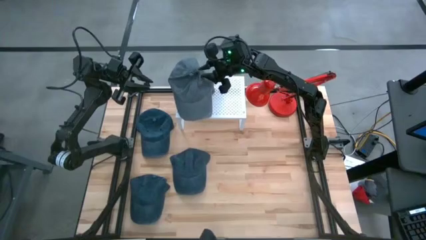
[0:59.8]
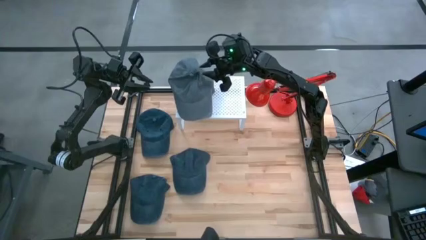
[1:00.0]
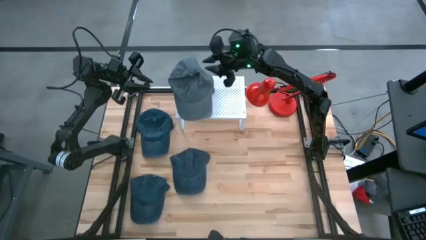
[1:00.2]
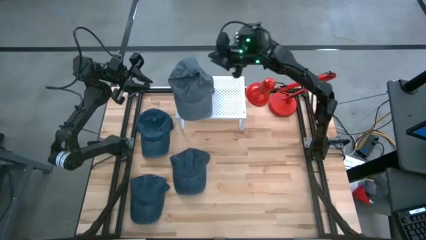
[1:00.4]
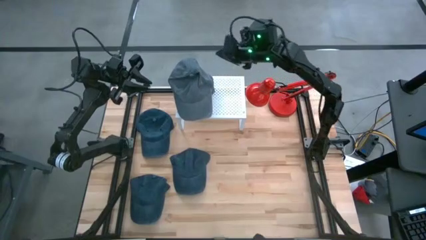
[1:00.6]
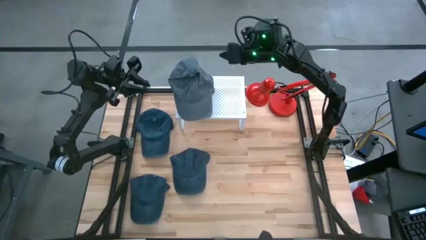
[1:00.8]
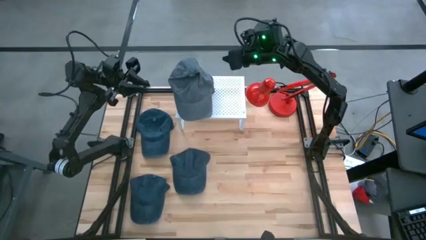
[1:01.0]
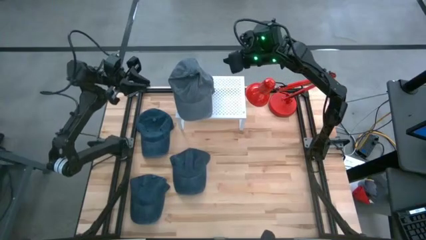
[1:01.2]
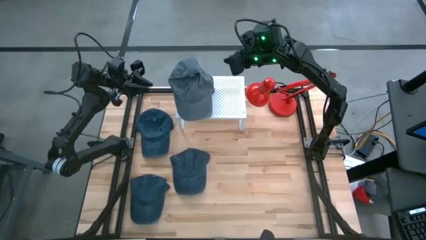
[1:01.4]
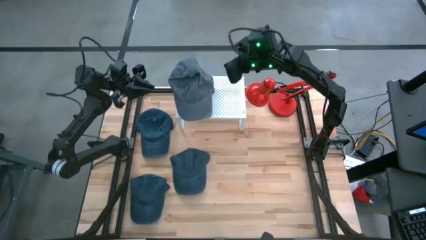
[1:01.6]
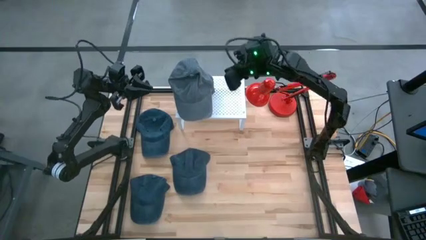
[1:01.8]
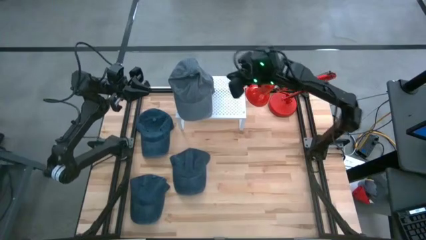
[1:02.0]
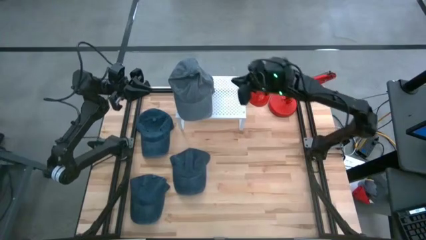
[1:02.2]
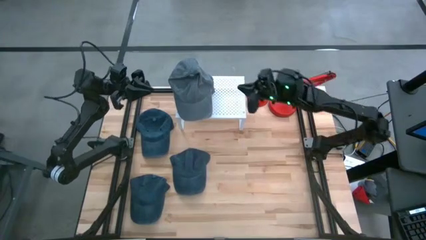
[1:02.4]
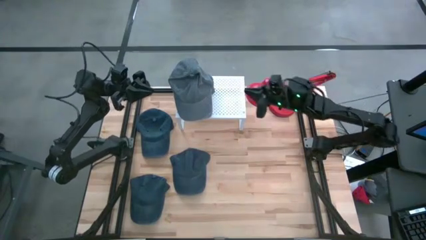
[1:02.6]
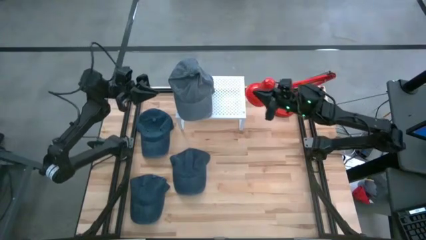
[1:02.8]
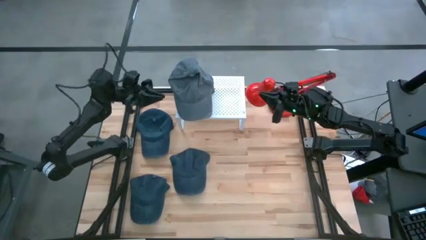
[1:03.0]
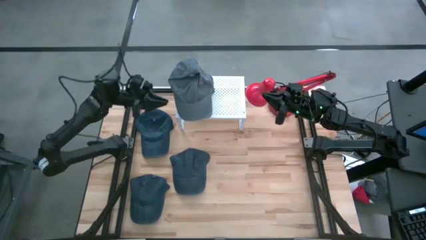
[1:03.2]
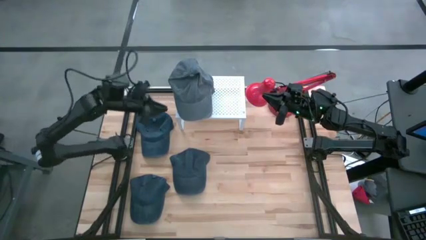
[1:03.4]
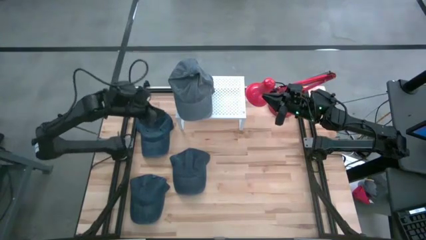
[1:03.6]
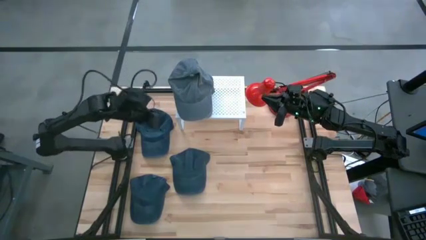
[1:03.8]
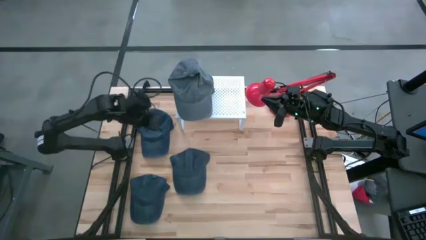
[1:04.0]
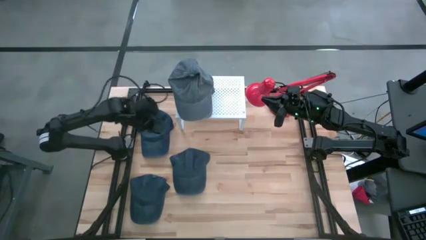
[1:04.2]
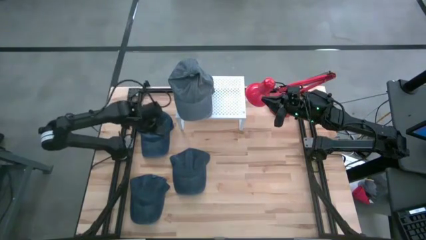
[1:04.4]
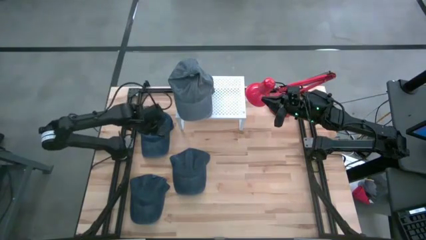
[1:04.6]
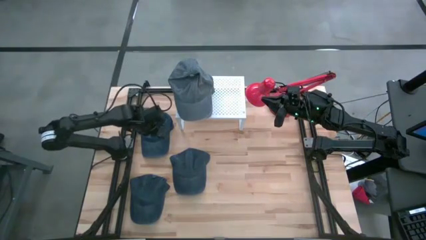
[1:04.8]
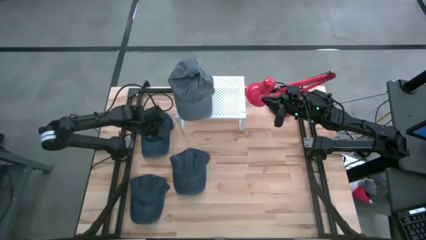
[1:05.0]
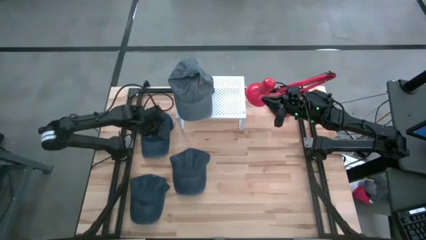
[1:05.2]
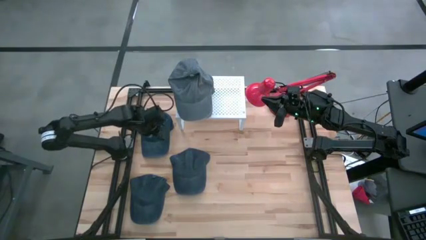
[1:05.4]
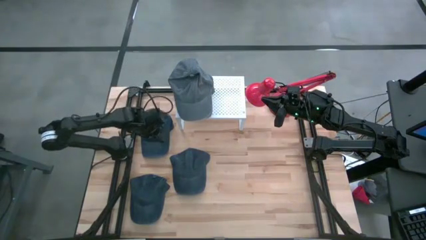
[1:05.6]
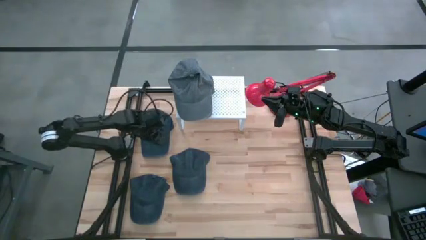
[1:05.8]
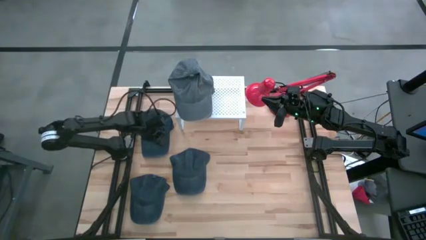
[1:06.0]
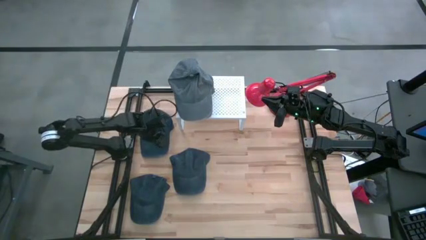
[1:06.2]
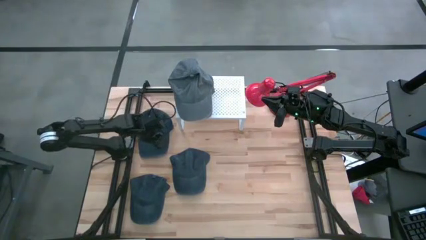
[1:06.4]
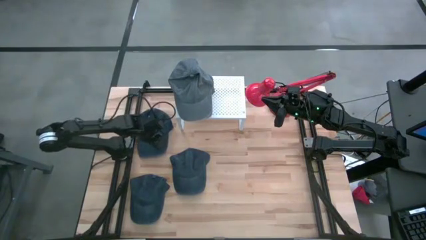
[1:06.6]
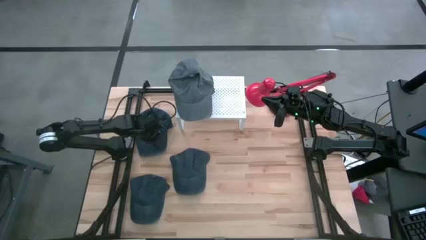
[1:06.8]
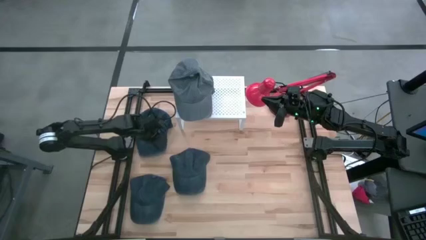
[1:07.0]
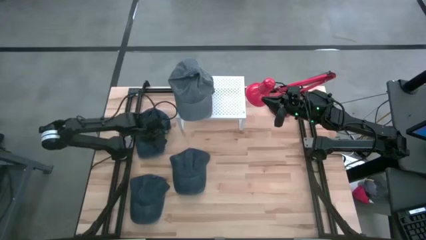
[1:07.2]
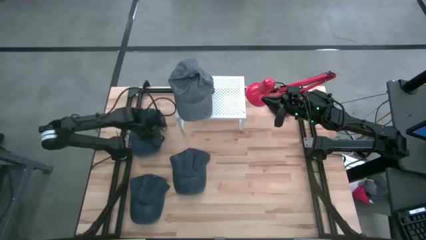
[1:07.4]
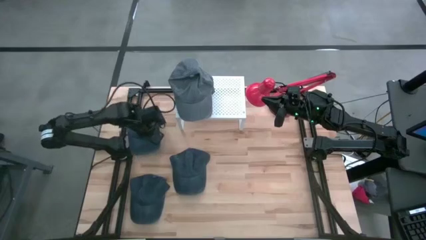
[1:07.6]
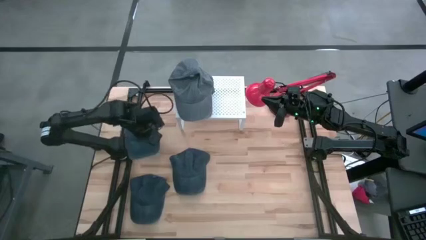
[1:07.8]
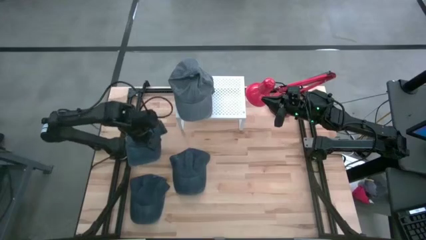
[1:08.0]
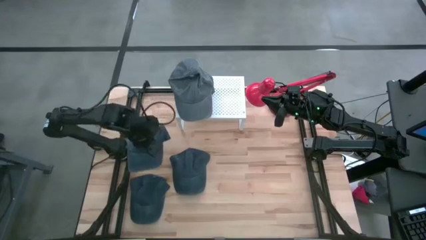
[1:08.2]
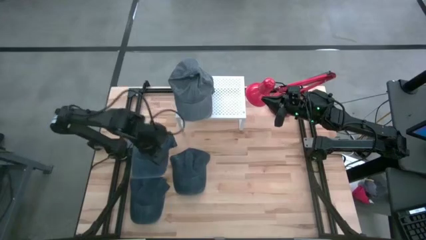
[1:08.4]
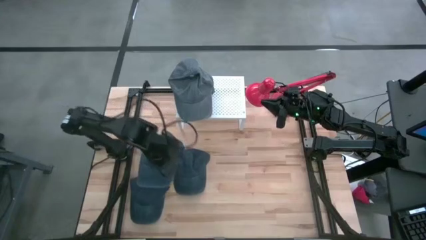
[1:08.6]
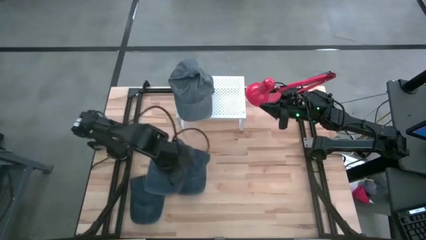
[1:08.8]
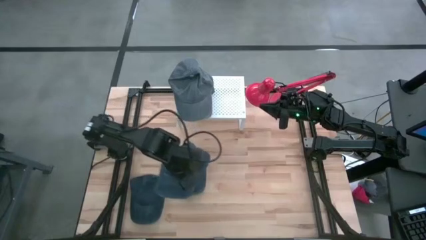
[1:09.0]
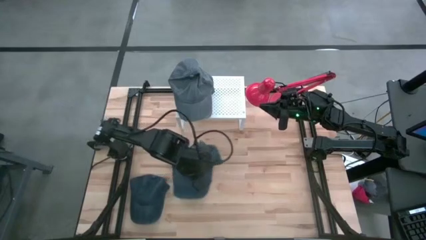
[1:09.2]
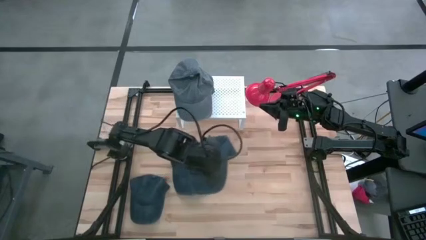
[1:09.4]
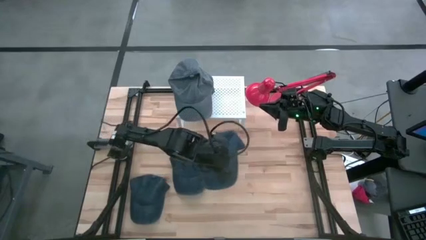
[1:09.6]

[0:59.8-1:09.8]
Task: Pick & Place hat
Put the top blue cap on the shelf
